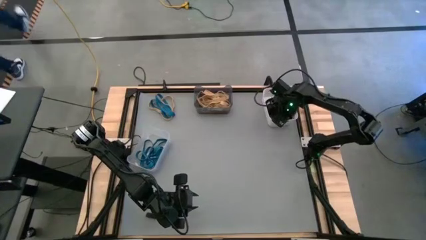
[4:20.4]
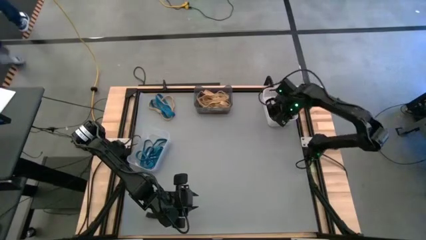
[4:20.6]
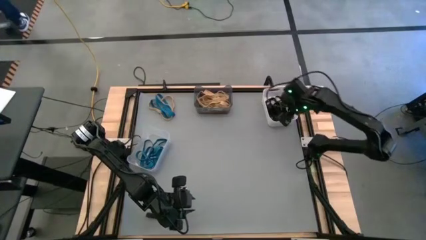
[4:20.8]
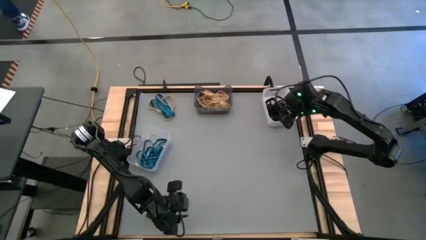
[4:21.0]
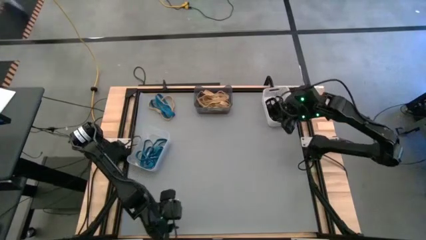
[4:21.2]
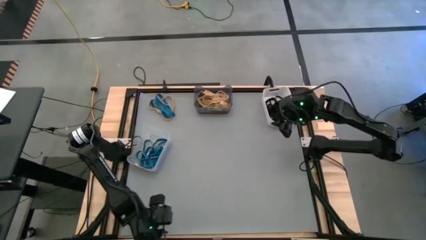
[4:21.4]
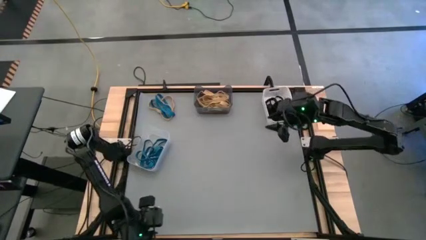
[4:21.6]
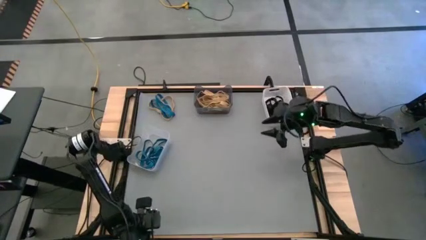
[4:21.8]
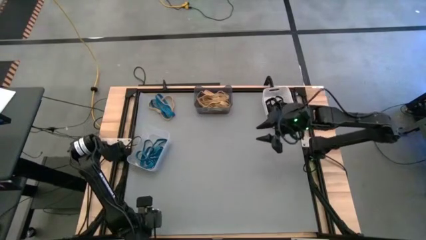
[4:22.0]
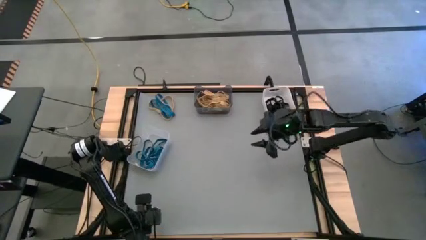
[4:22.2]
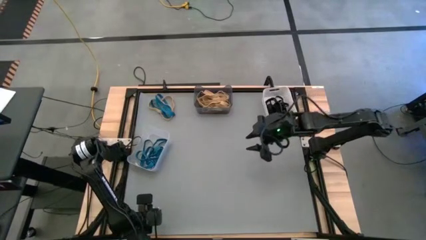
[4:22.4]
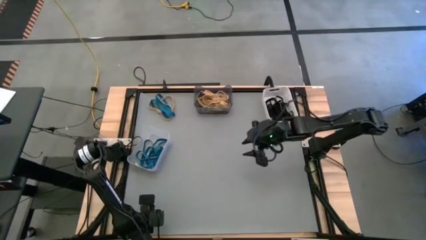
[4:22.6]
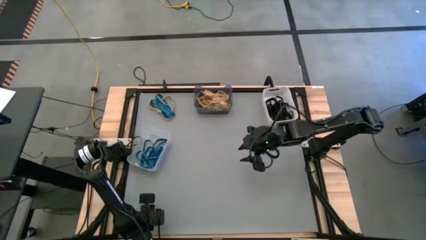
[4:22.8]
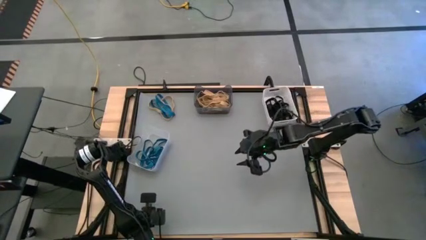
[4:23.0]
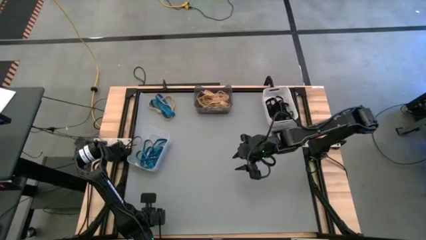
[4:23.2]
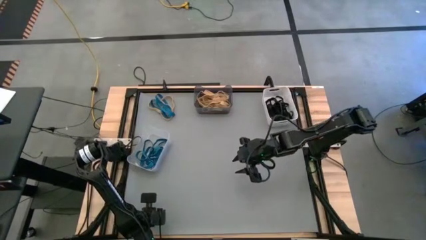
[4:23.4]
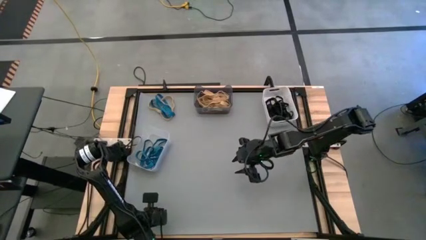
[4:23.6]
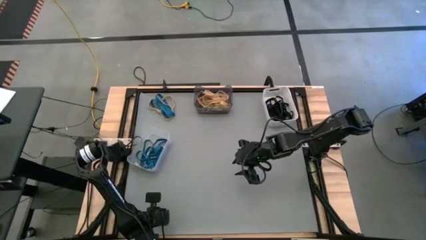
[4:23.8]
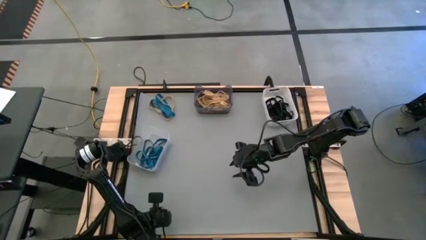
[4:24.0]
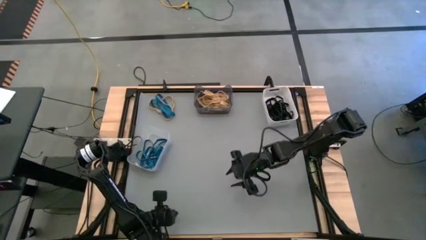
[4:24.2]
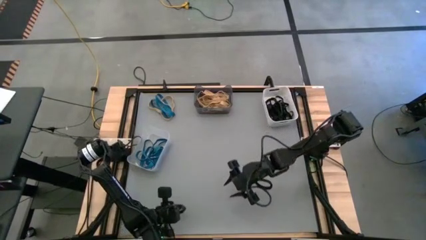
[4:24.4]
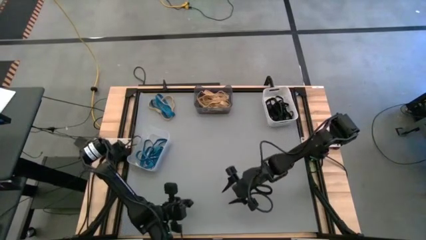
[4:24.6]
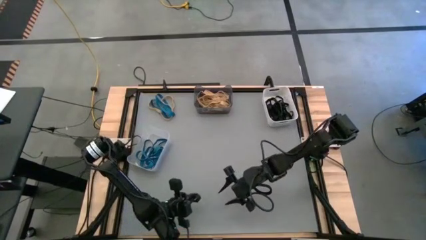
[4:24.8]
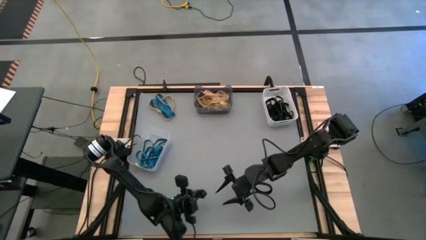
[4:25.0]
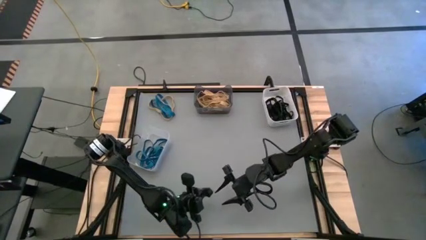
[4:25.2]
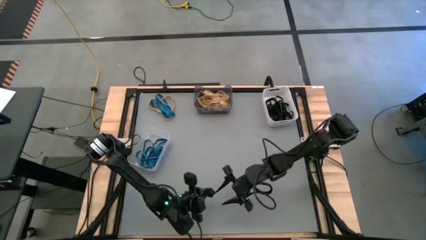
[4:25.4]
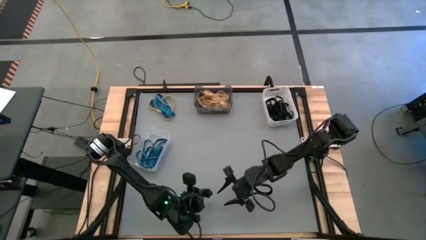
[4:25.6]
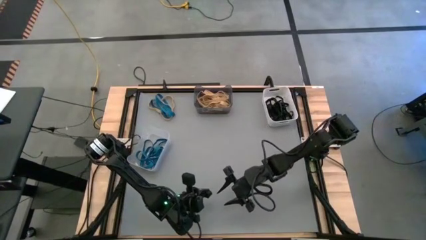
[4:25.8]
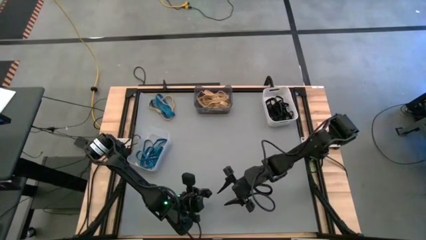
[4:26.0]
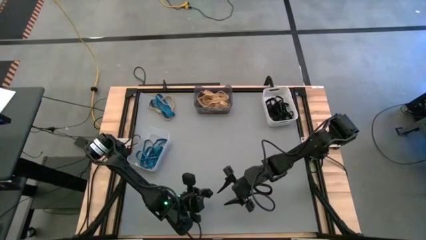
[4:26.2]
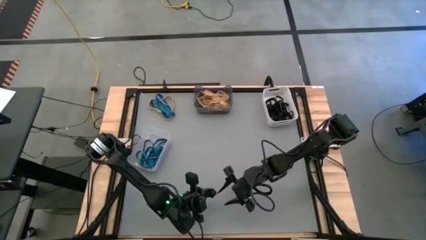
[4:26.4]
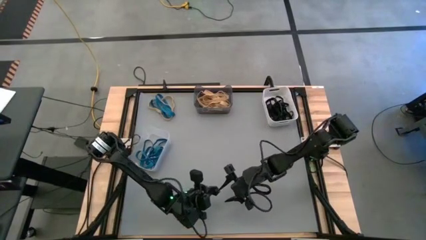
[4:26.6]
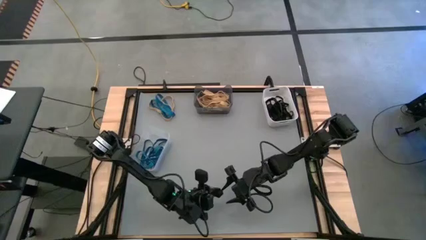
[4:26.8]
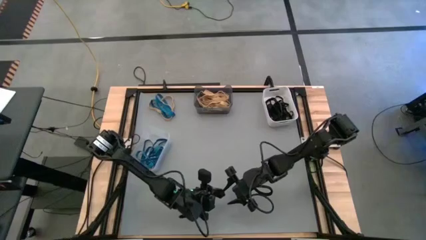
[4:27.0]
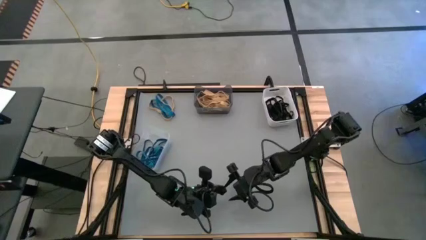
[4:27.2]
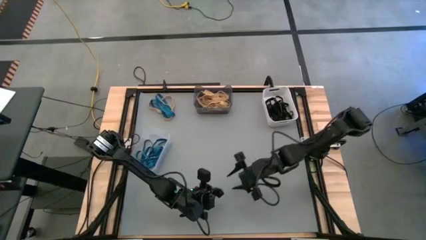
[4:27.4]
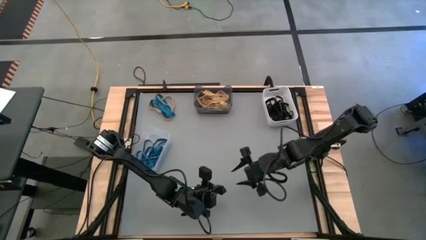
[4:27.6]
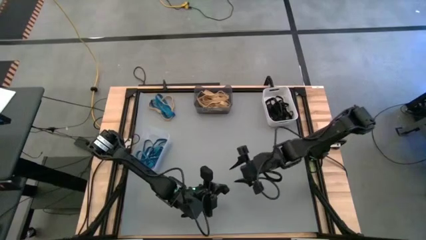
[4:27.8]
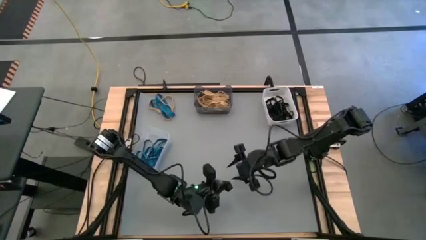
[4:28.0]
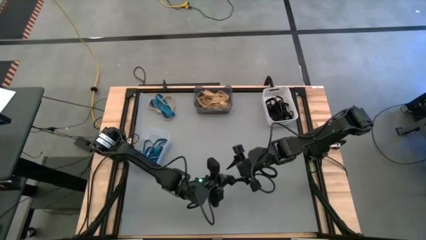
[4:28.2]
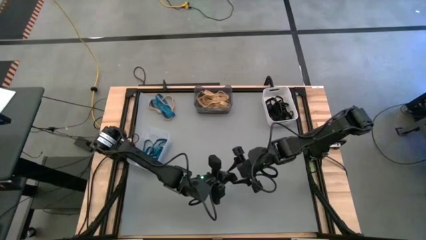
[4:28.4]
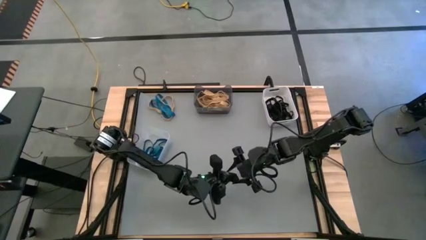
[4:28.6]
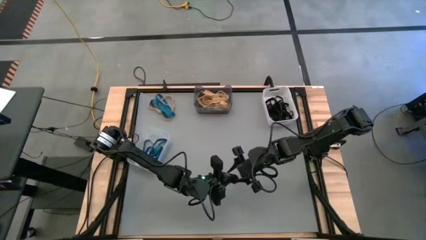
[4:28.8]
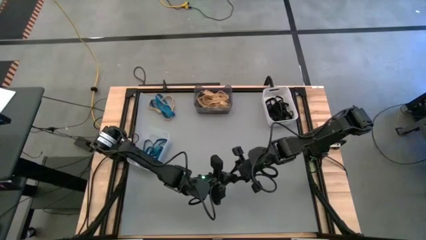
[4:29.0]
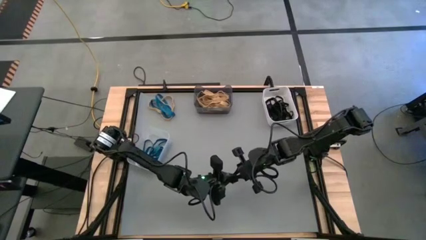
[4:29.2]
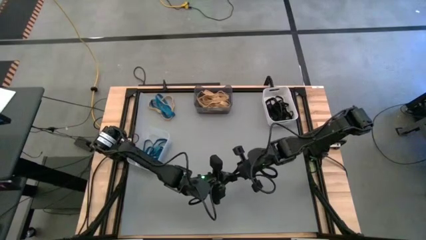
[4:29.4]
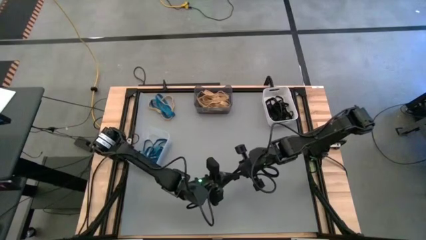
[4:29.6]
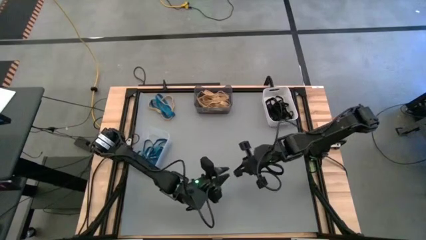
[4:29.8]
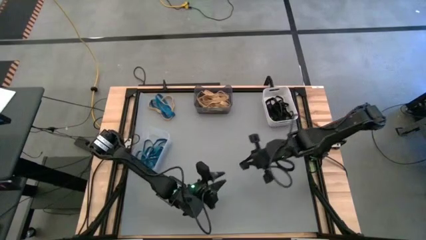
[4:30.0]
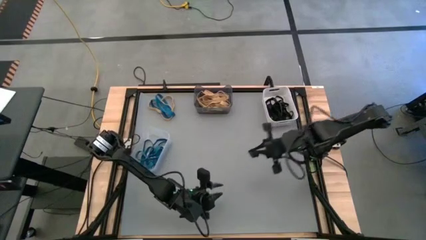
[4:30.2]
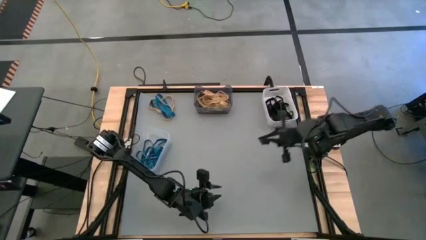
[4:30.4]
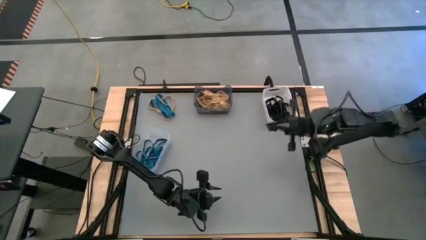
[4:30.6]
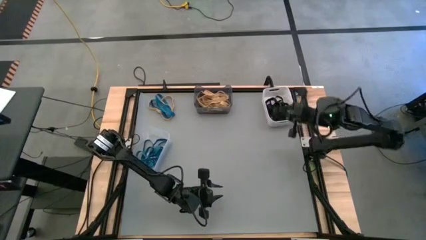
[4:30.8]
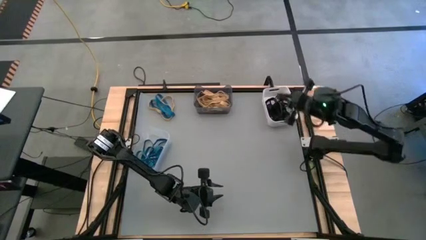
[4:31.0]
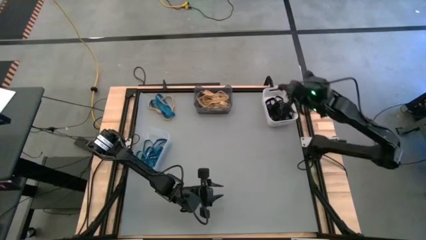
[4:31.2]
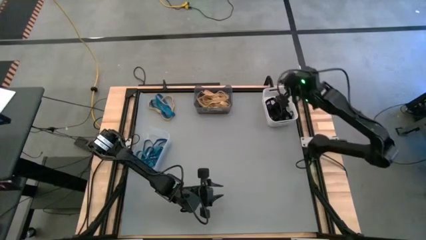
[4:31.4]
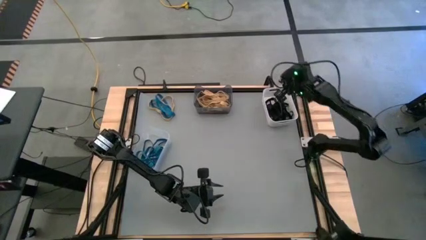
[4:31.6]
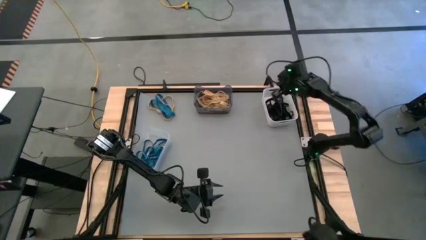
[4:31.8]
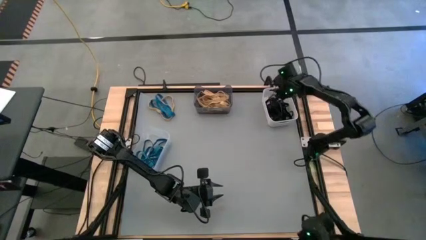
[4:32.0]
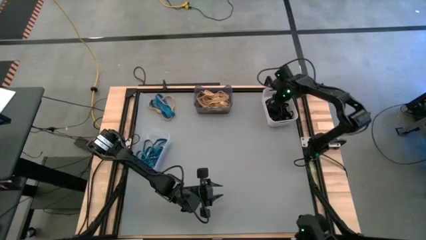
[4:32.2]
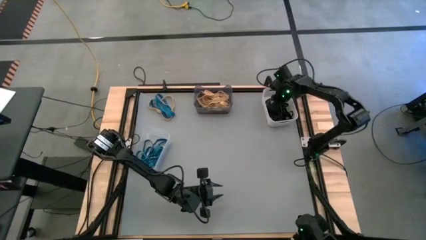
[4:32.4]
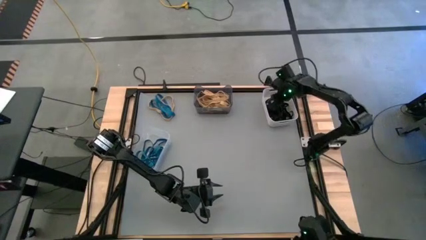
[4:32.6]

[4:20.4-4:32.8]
Task: Sort rubber bands into baskets
Put the black rubber band into the white bin

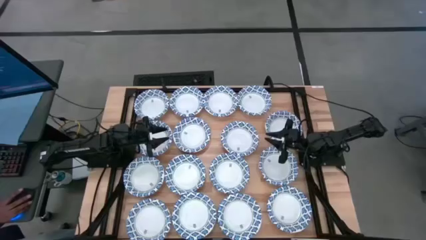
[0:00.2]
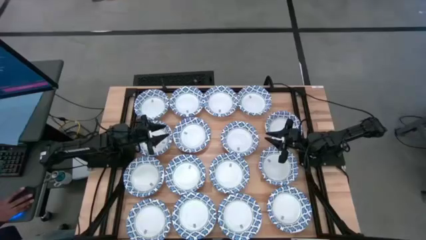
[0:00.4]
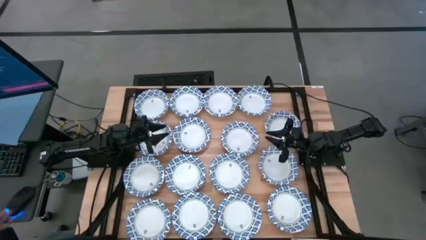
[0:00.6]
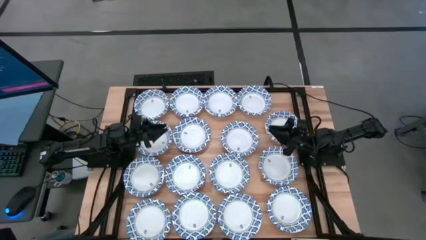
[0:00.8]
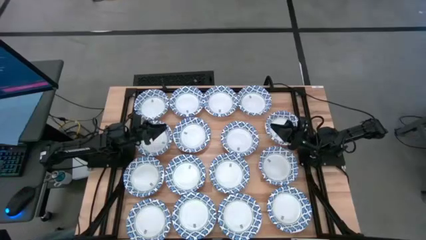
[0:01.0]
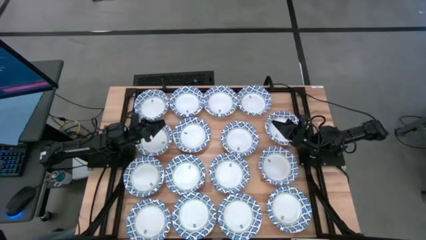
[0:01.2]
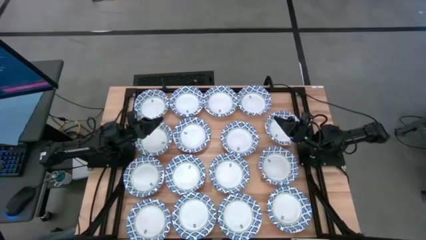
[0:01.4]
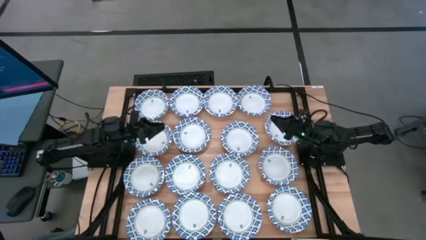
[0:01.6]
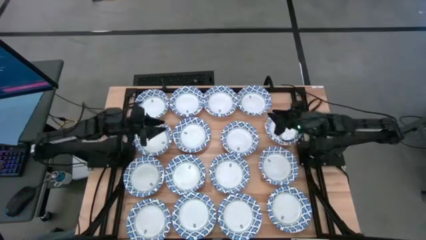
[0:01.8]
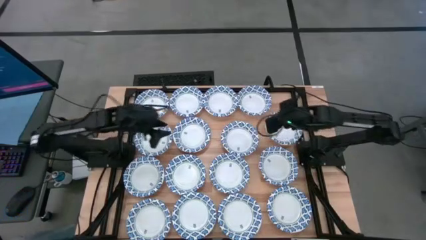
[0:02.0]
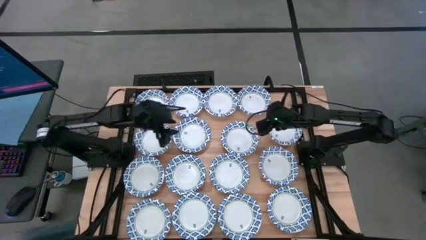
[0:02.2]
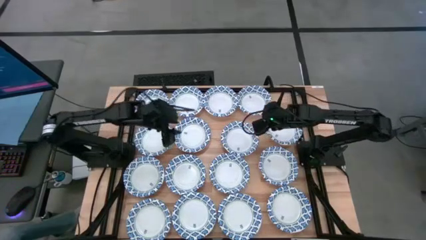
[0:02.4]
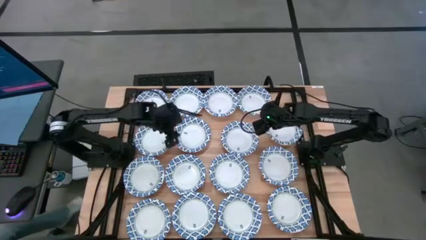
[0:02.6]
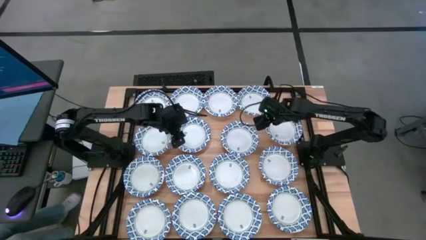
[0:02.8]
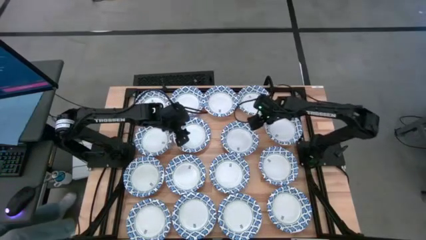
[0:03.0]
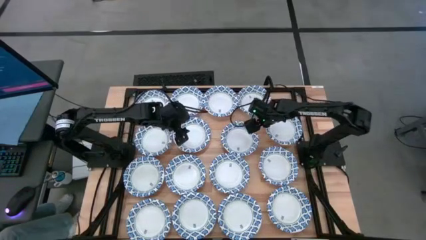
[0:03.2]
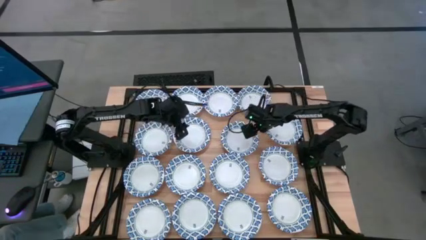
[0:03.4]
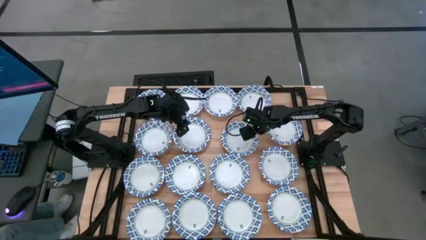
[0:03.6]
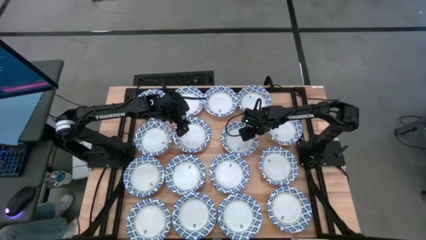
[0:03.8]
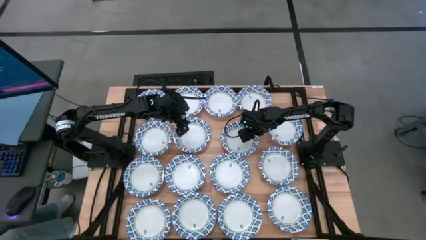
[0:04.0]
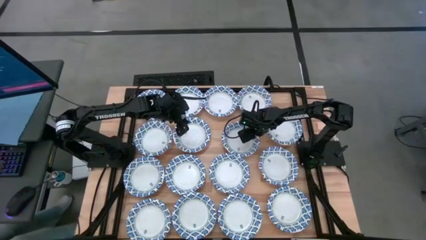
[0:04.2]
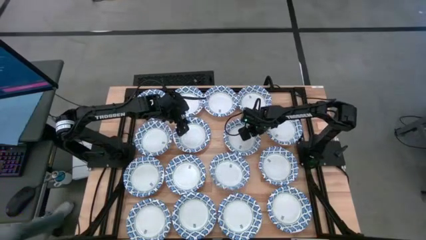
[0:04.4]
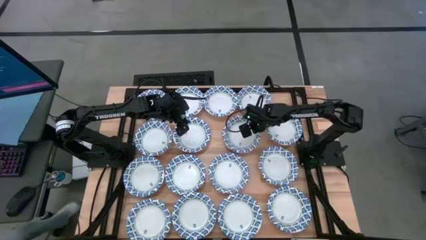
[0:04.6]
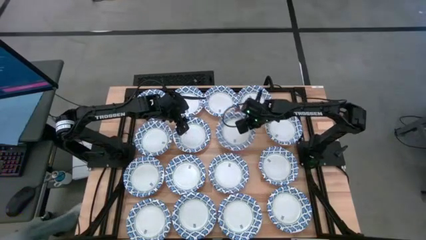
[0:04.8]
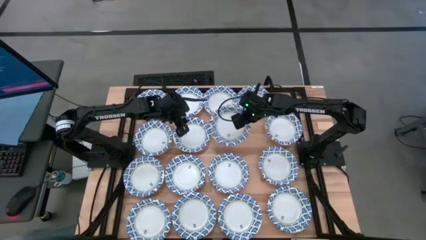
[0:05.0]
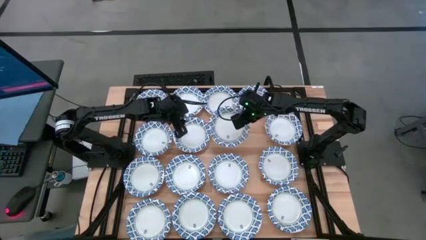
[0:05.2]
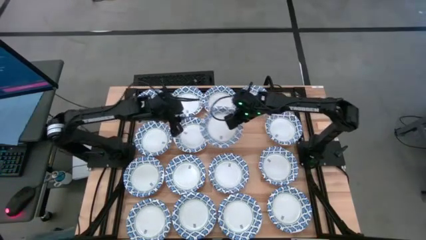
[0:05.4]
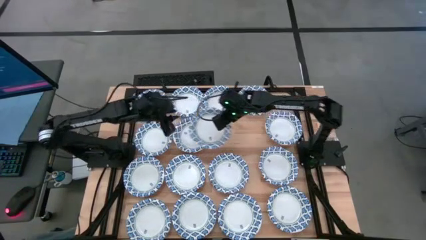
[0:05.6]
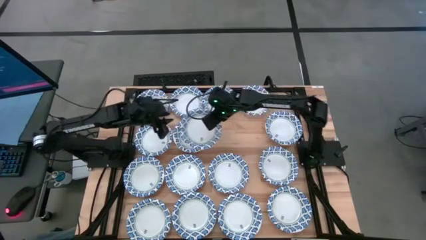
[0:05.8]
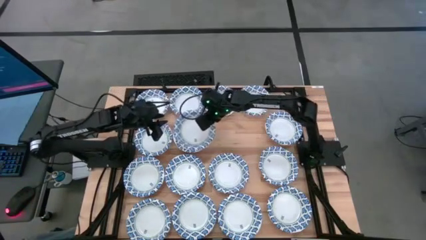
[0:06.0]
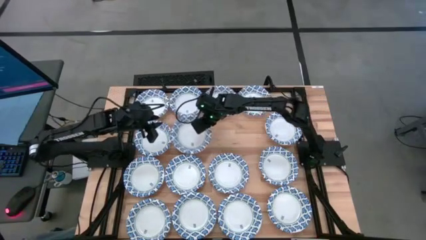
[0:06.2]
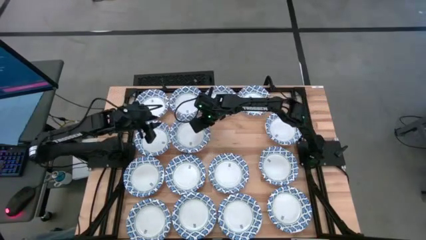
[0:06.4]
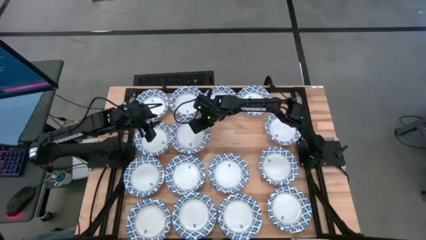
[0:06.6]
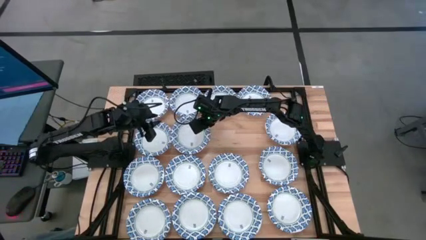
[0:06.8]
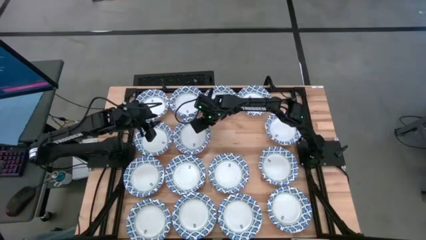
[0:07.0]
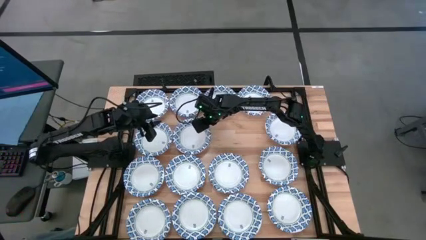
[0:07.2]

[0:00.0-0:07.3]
Task: Nest bowls inside each other
Stack the blue bowl on top of the blue bowl
